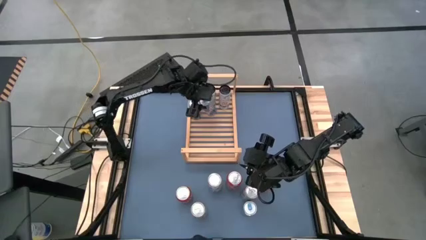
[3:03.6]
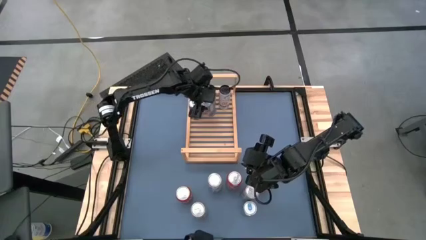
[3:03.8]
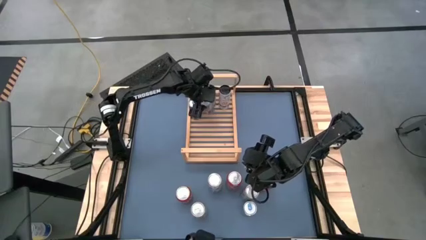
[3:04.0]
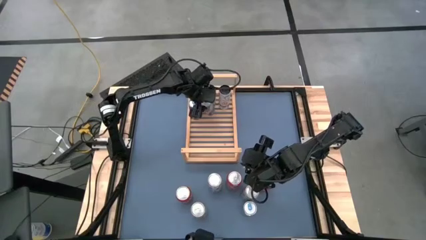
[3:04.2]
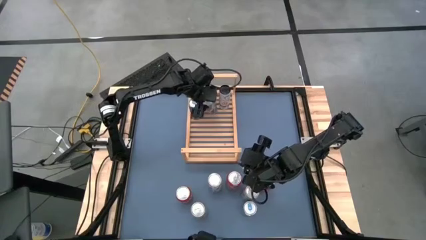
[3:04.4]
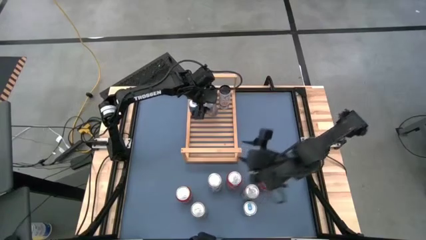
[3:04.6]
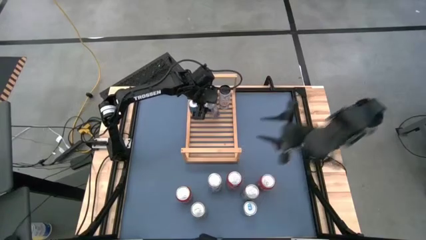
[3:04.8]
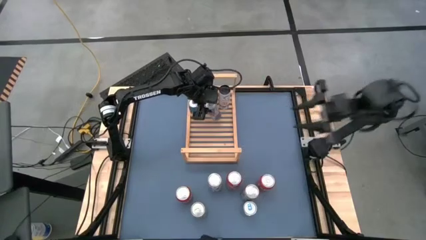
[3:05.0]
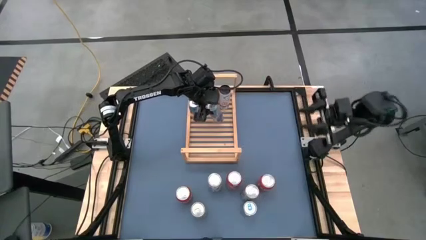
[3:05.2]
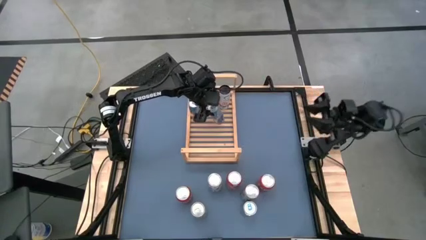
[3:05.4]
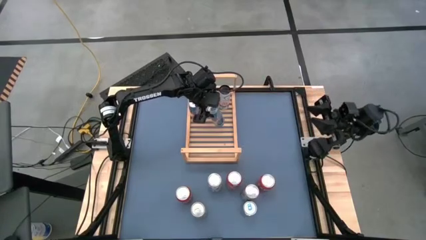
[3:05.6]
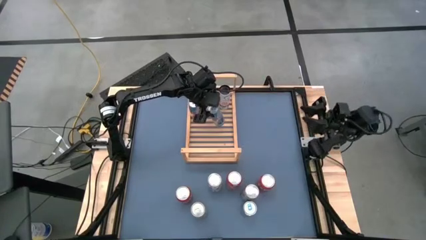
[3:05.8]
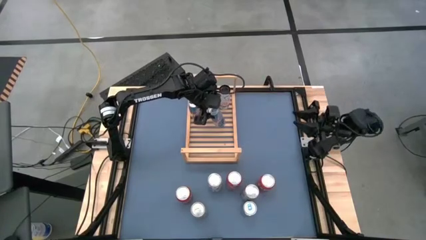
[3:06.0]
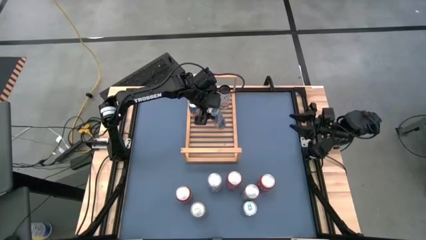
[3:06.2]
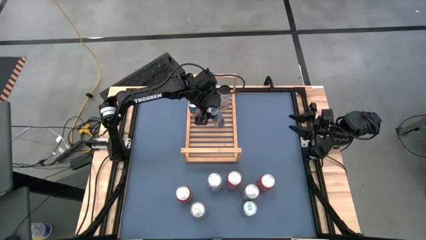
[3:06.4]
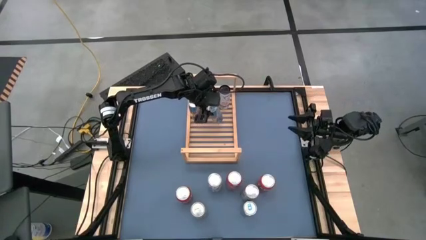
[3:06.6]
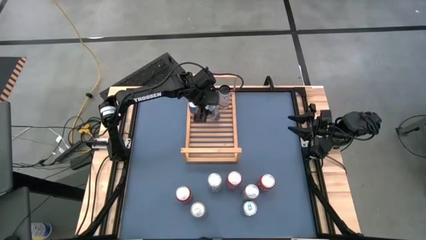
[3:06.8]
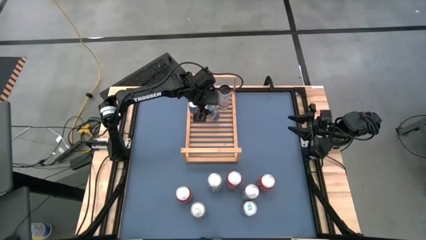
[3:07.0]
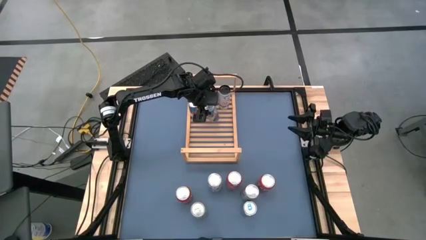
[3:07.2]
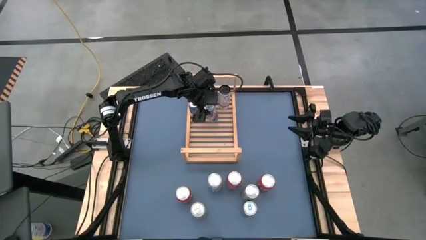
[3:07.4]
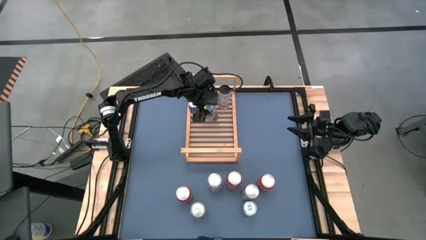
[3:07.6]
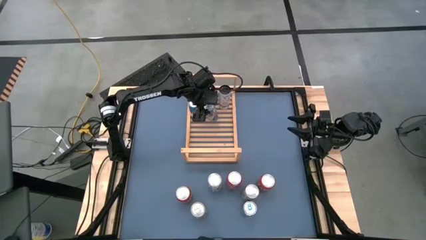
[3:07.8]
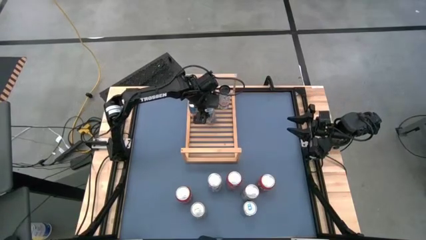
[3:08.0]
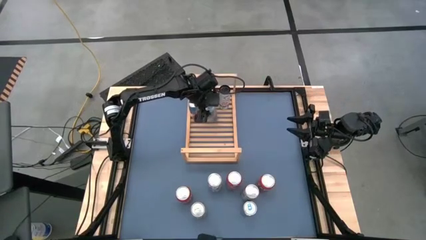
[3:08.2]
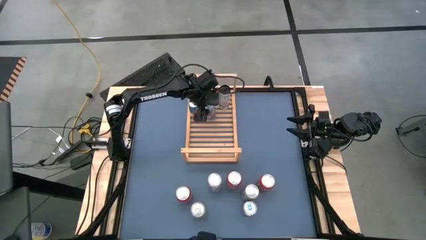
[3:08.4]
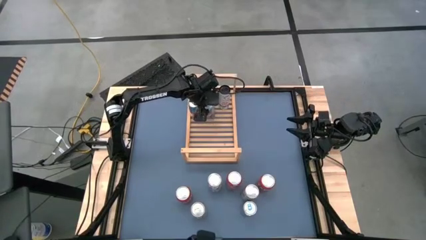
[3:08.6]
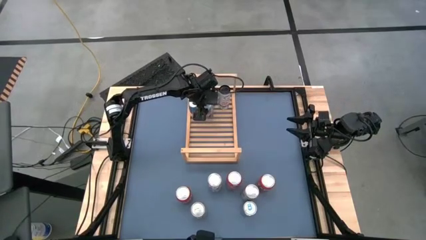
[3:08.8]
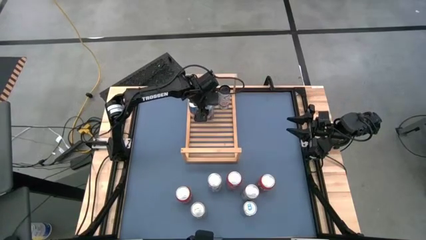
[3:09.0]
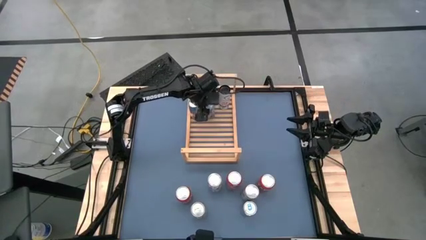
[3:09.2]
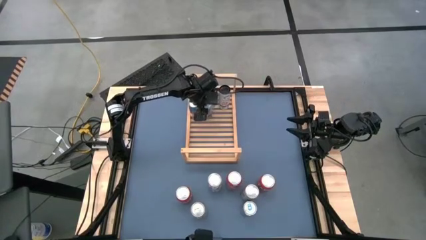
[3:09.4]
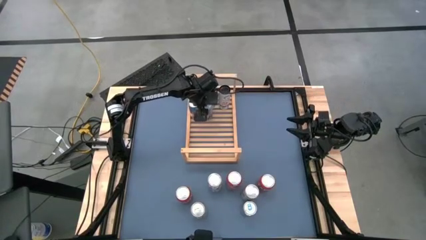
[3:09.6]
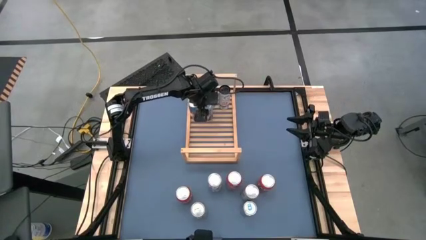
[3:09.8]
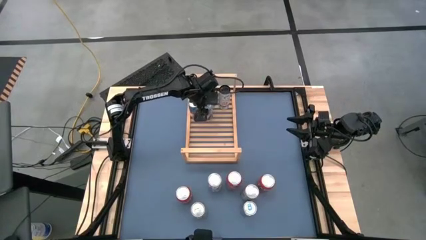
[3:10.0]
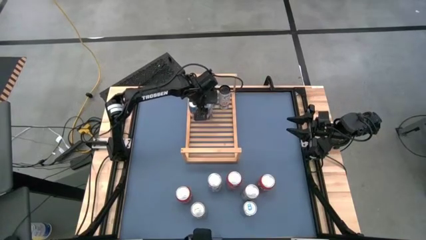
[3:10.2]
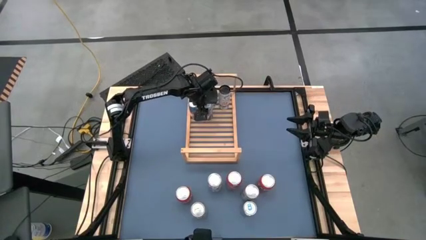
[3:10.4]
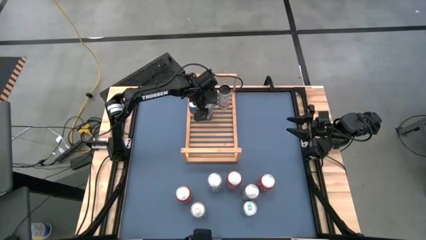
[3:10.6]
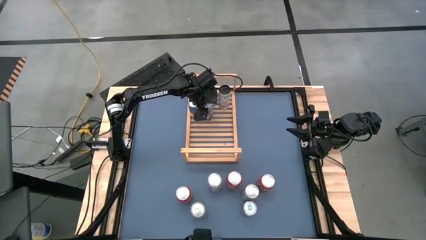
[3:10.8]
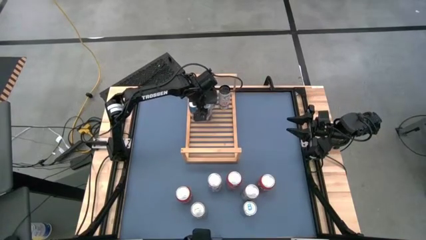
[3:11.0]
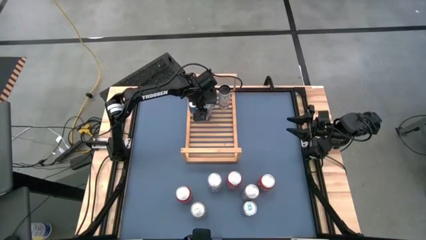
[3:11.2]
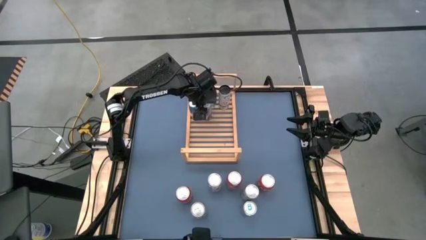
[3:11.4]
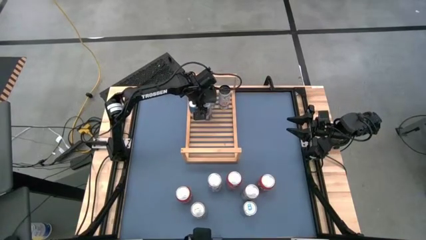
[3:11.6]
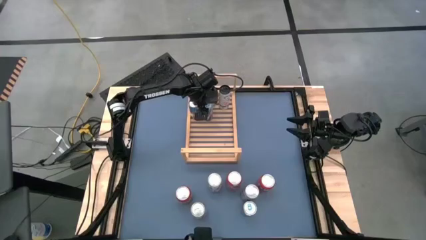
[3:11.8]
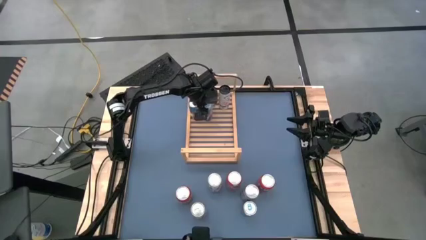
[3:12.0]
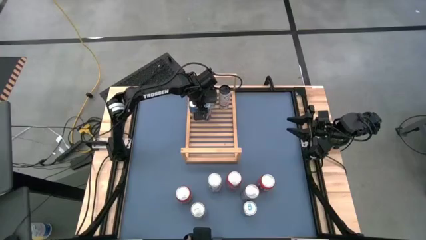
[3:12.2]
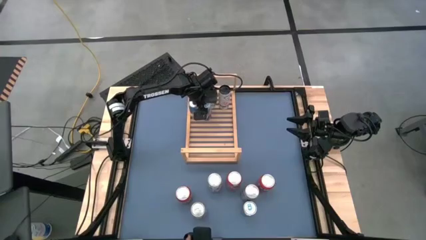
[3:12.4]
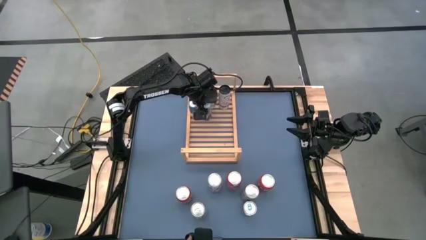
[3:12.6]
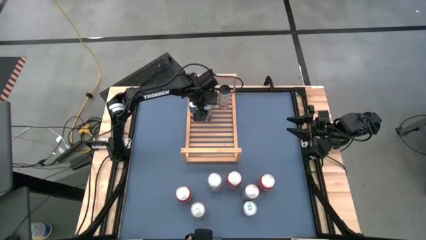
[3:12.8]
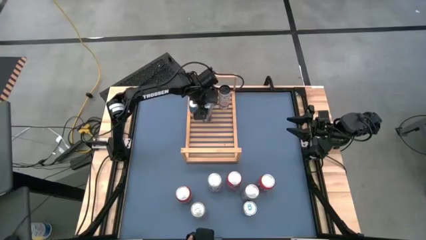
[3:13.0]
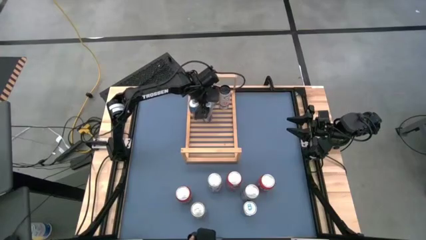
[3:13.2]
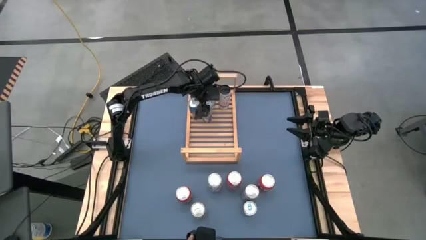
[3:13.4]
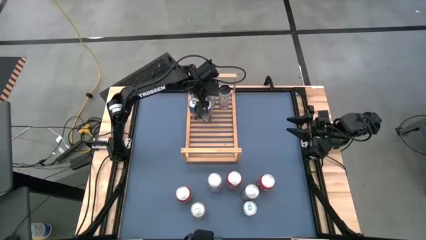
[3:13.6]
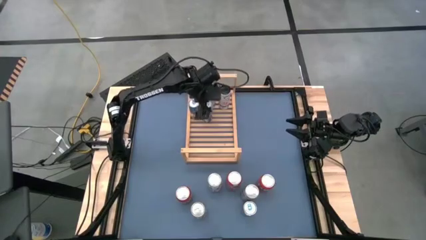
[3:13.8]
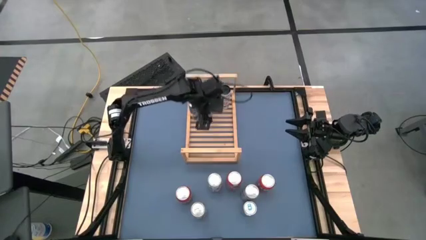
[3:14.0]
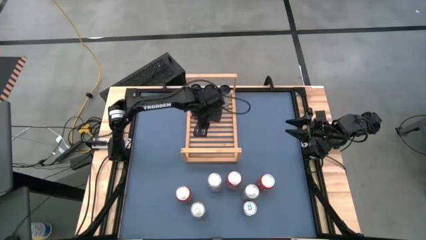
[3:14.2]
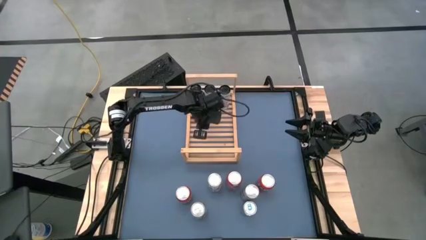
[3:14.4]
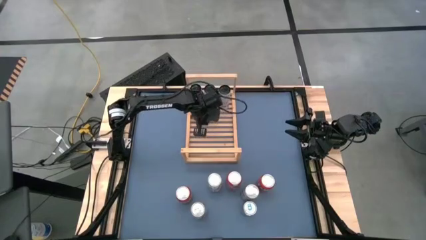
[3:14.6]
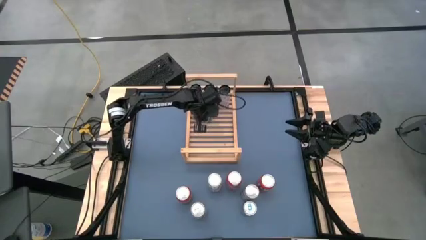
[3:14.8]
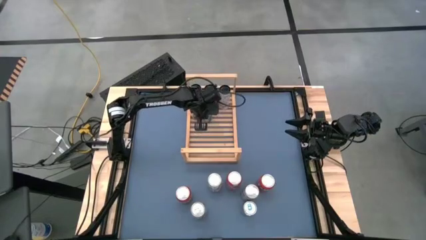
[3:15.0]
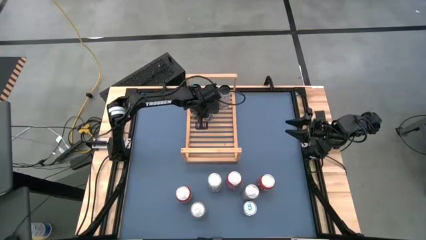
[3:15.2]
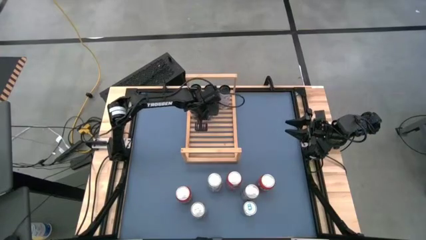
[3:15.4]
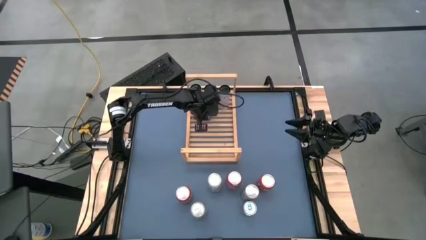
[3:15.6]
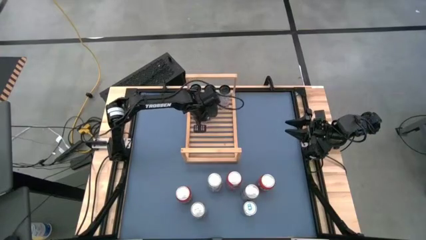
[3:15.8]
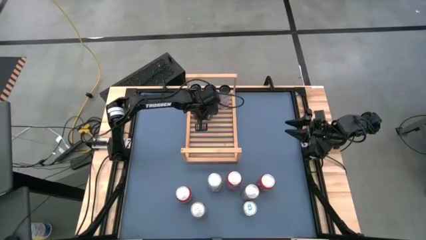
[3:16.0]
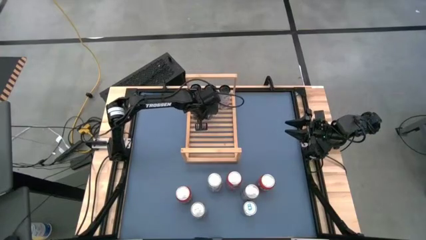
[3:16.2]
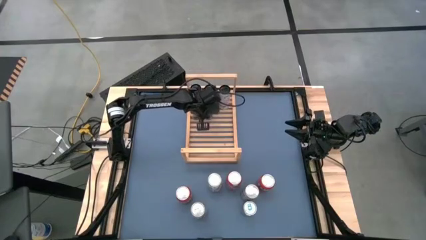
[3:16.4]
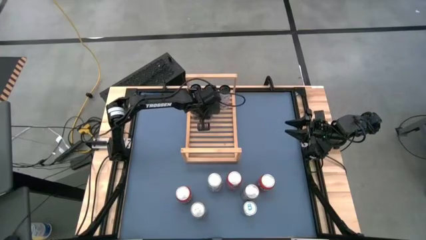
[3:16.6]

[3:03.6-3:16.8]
Task: Place canned beverage on shelf
Put the left blue soda can on the shelf aligned with the other blue soda can

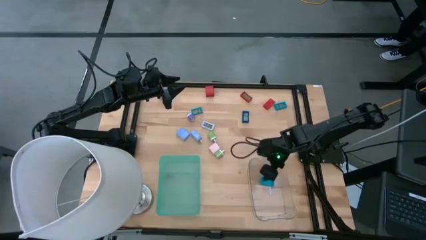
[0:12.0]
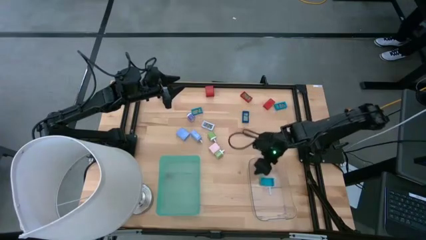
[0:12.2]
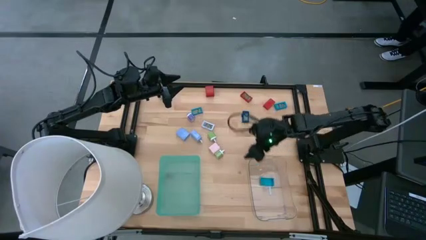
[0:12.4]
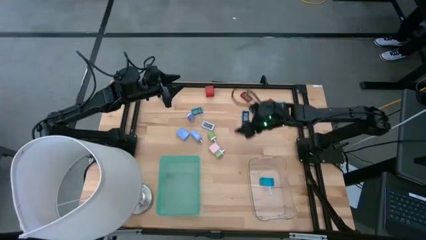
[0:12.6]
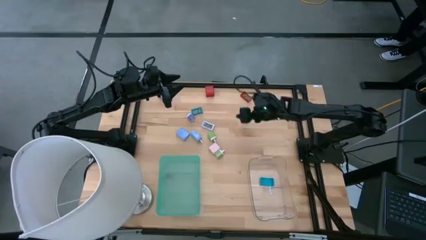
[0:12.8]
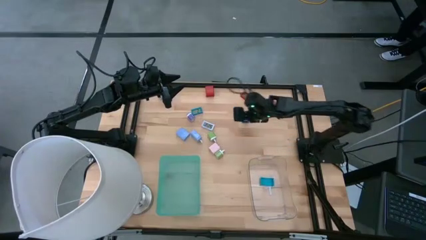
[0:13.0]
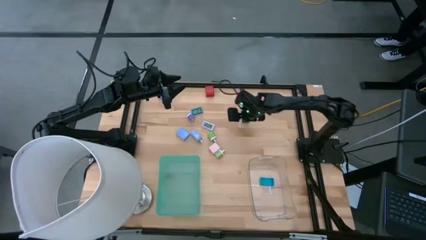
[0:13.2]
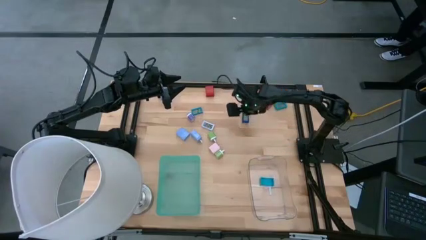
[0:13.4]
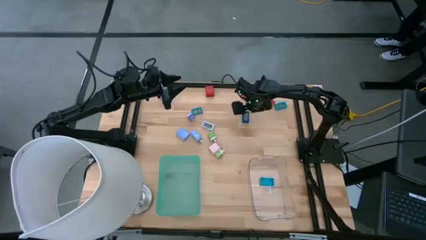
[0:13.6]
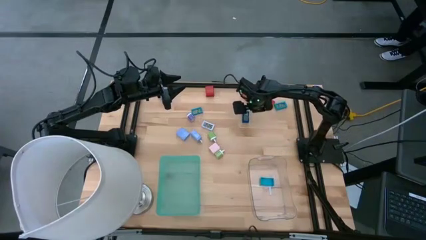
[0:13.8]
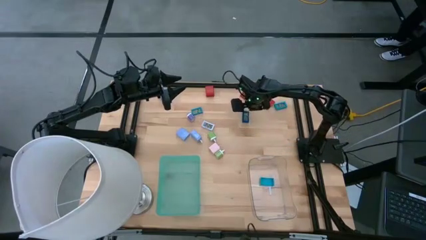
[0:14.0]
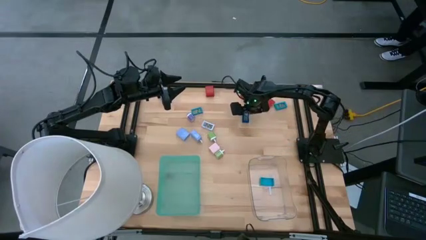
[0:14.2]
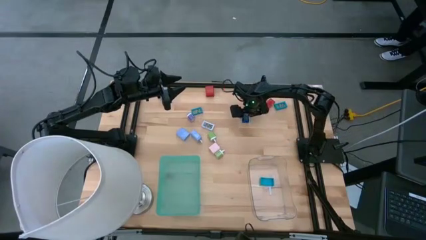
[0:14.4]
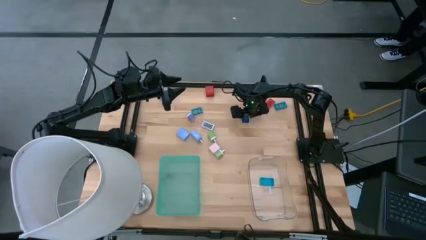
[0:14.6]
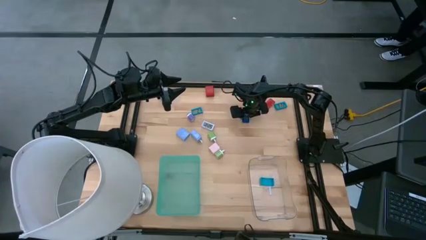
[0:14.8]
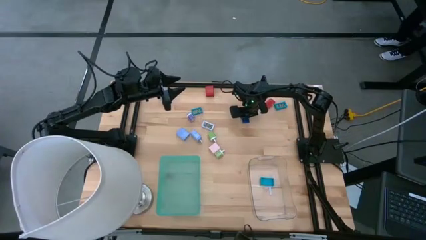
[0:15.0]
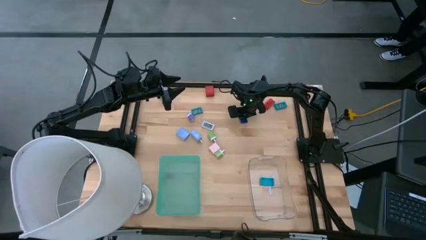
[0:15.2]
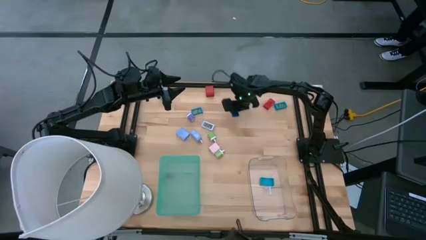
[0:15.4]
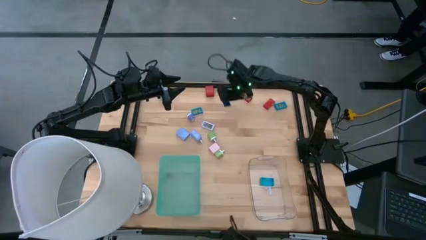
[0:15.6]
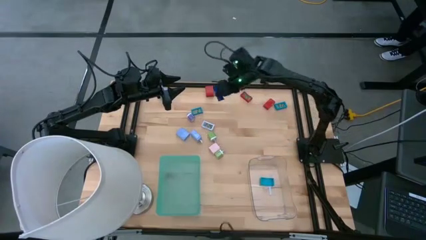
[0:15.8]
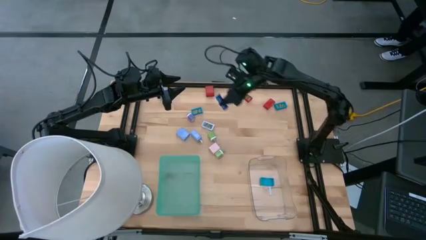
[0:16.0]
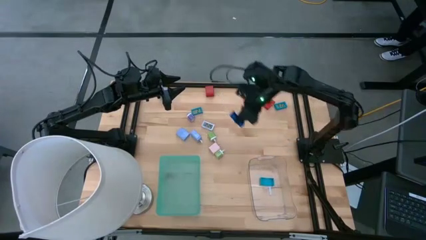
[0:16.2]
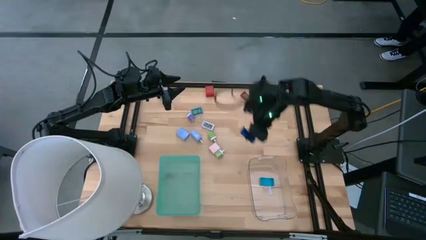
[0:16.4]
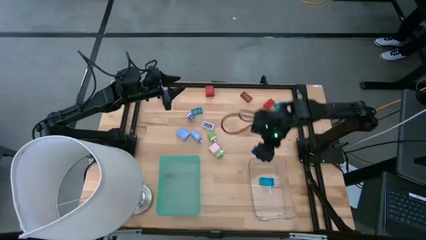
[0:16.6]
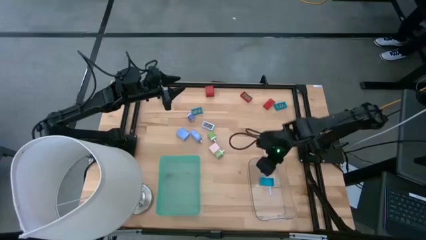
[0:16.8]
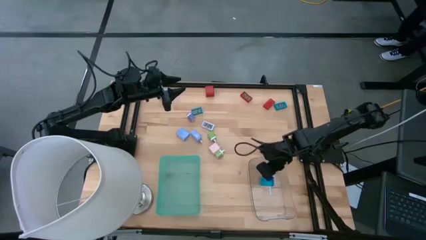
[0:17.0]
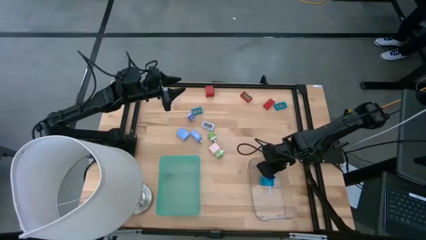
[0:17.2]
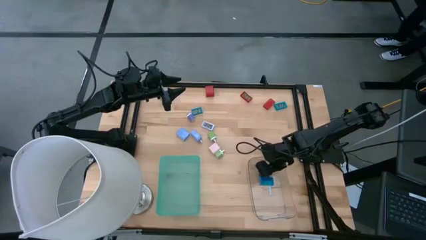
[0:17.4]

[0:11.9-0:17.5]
Task: Pick & Place Office items
Put the dark blue digital clock into the transparent bin
